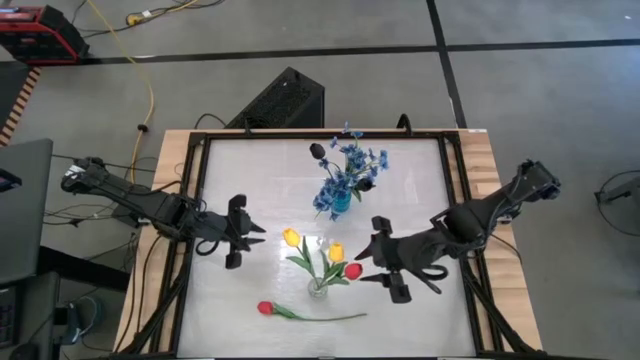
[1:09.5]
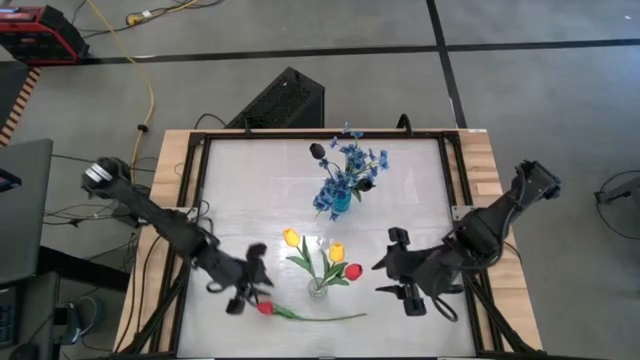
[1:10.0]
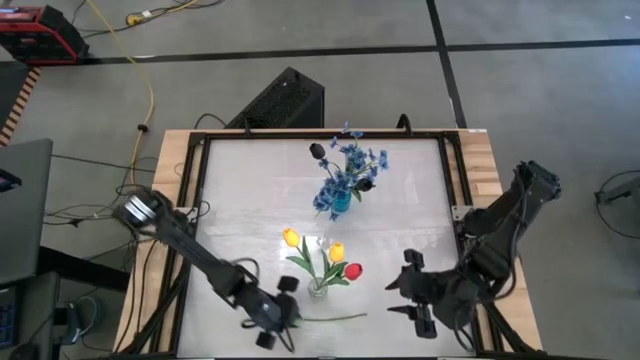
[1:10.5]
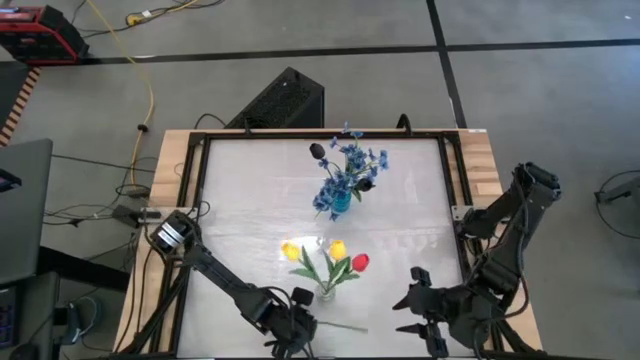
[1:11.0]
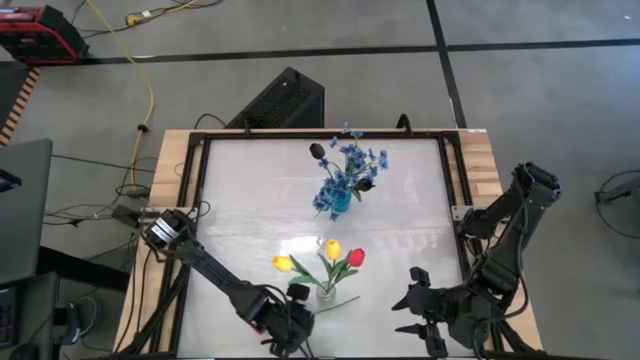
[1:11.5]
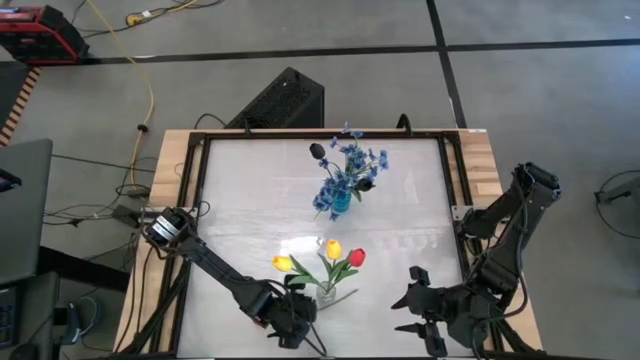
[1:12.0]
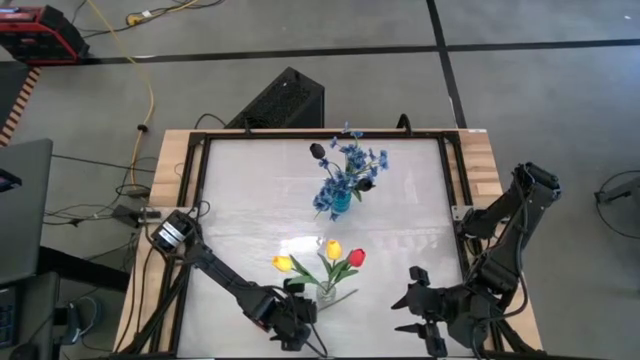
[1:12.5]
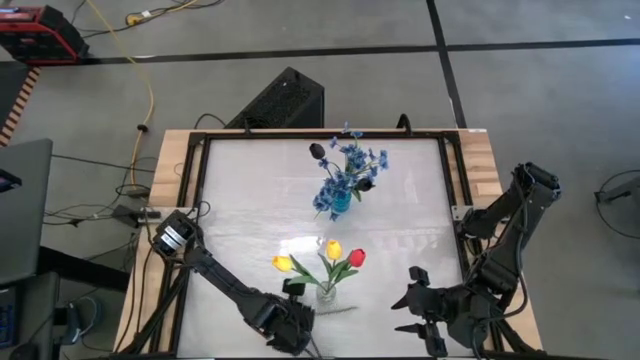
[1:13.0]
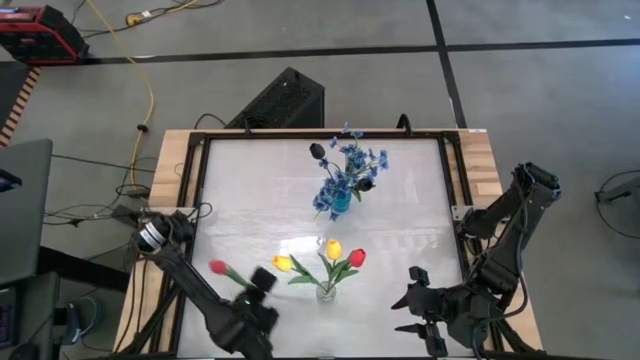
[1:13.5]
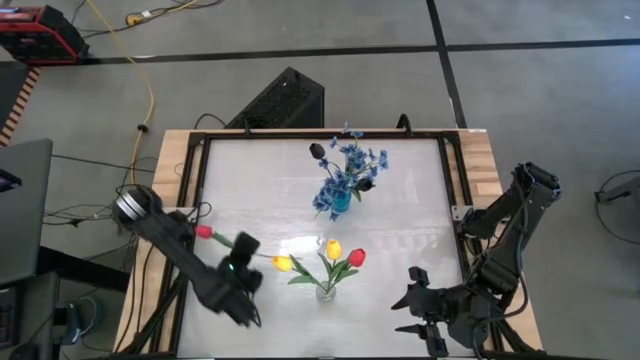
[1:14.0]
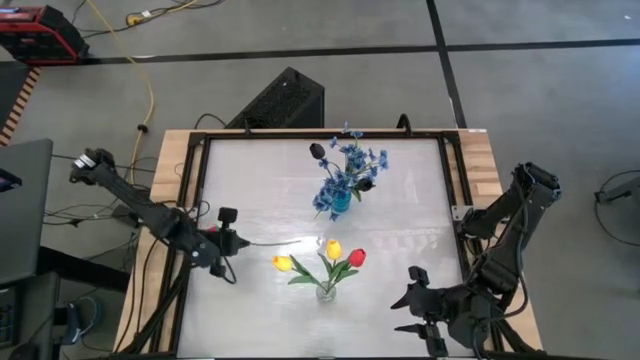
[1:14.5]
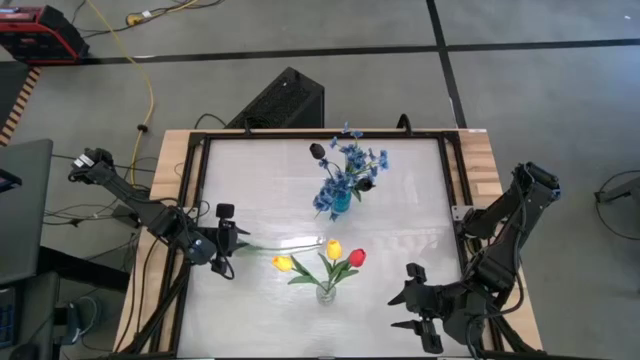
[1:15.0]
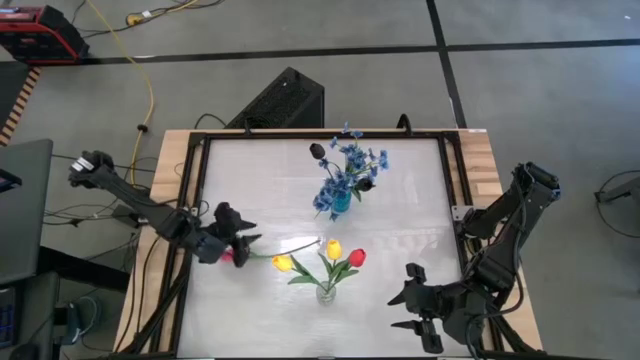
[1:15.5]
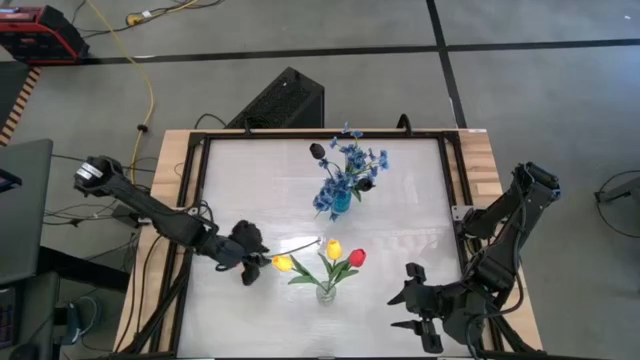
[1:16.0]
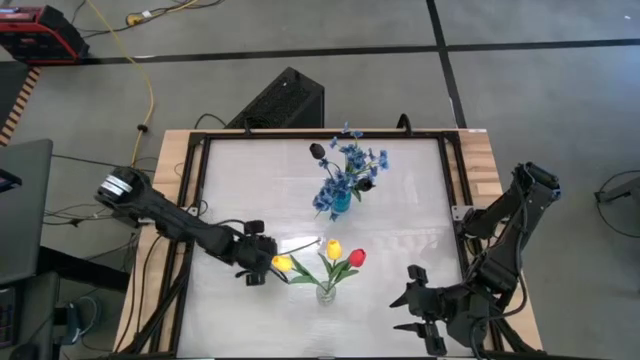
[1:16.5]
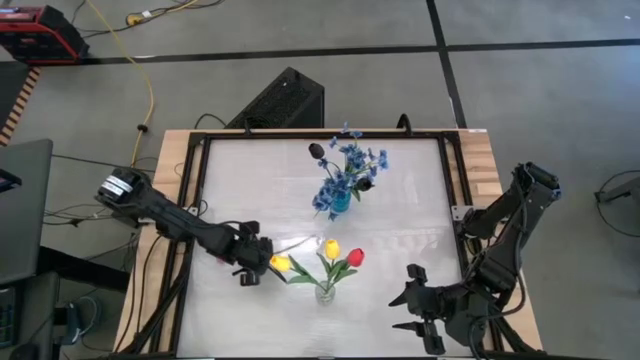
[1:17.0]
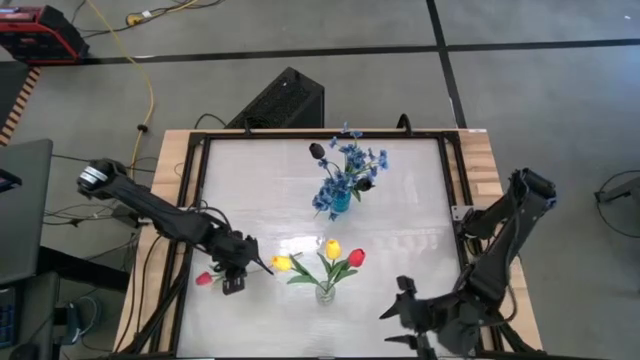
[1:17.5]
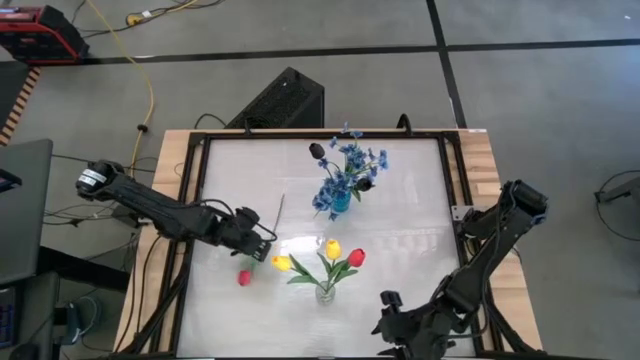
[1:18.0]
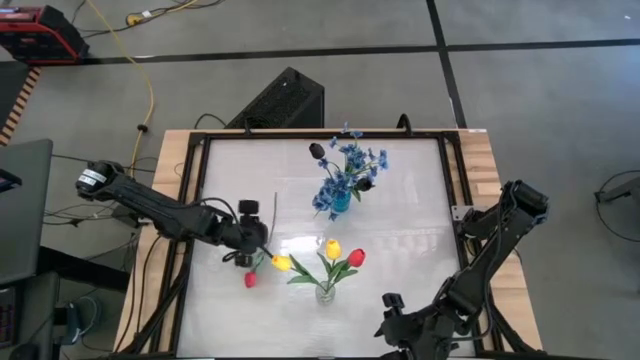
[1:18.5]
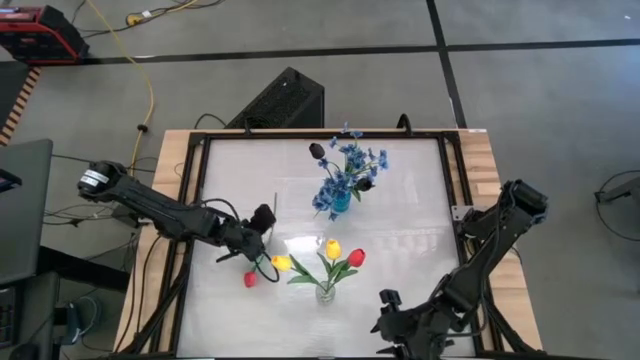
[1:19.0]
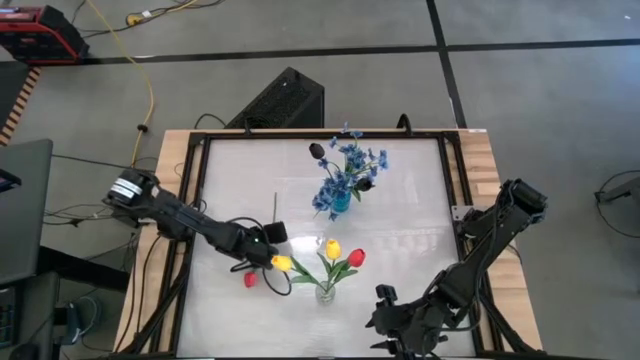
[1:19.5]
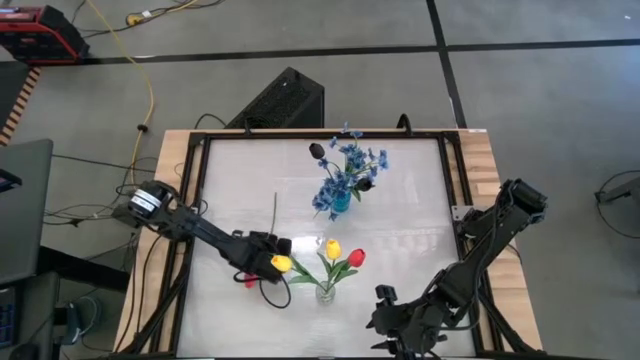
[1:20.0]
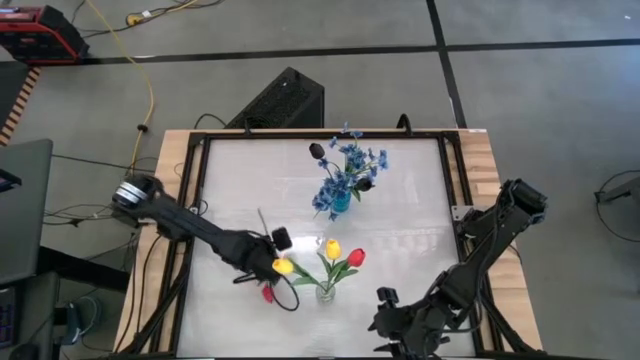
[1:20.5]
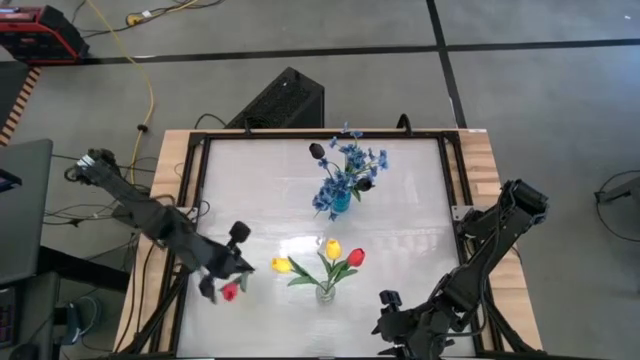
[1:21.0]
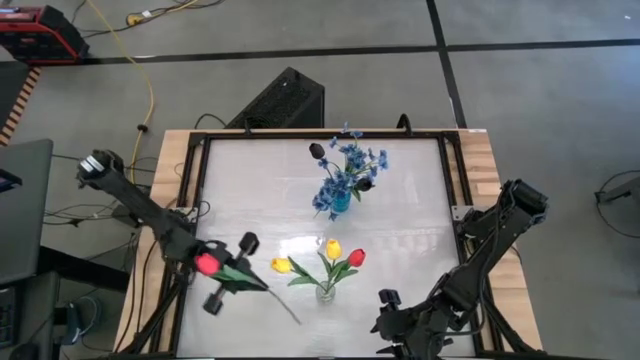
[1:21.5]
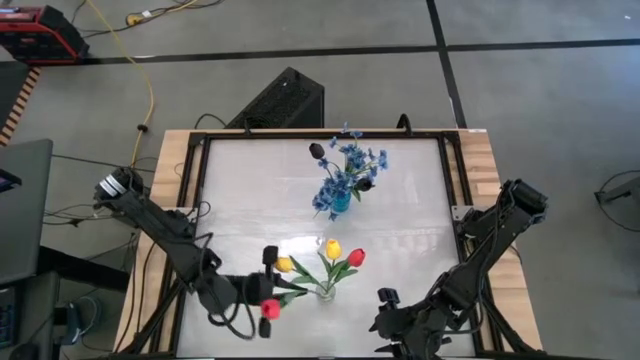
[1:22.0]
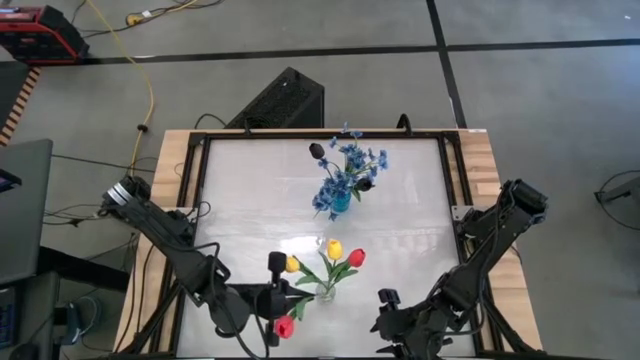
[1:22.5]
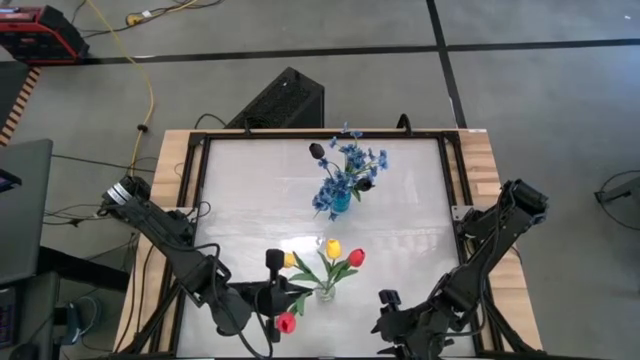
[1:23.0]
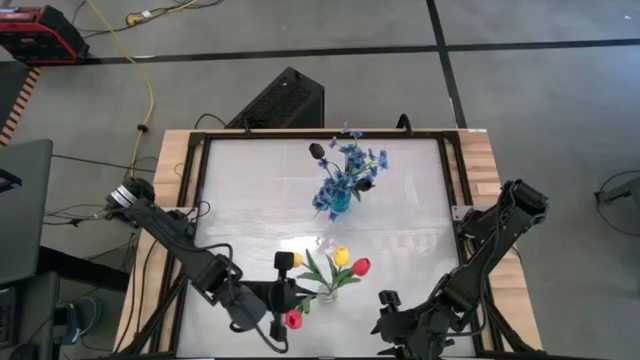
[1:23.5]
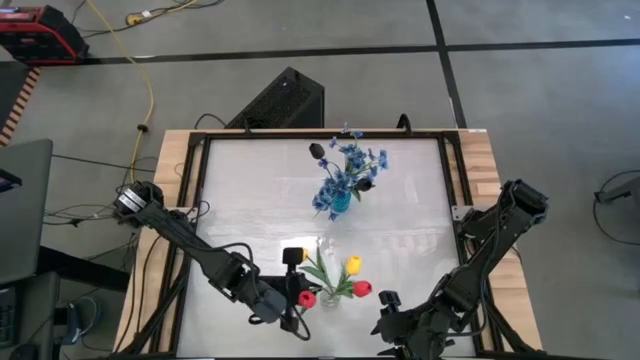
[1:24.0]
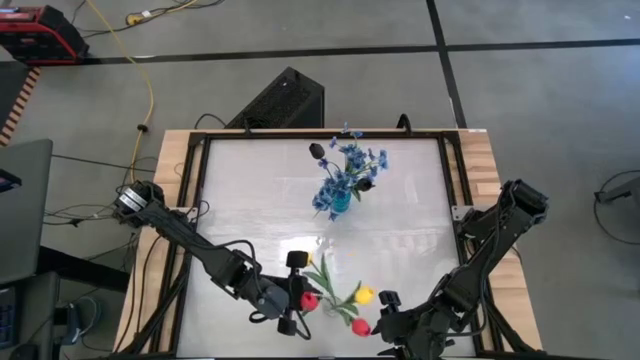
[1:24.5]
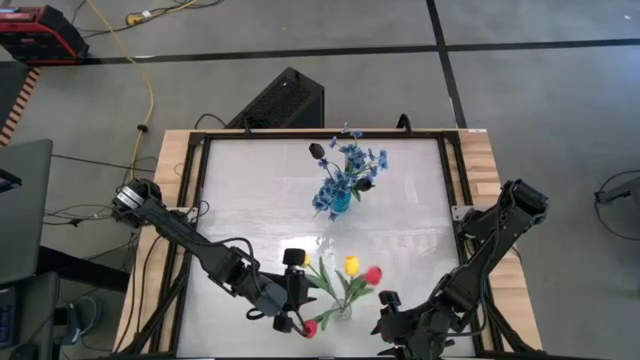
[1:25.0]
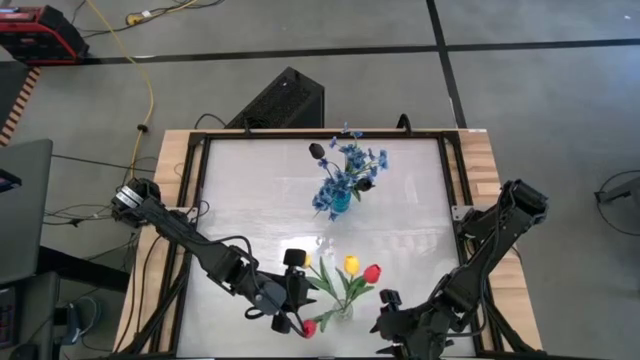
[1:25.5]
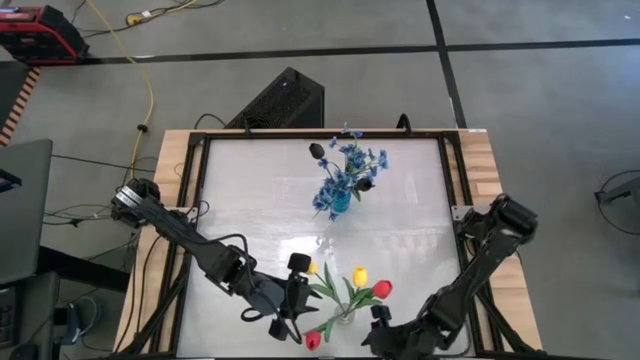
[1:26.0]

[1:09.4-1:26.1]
Task: Sort flowers into vase by color
Put the red flower into the transparent vase

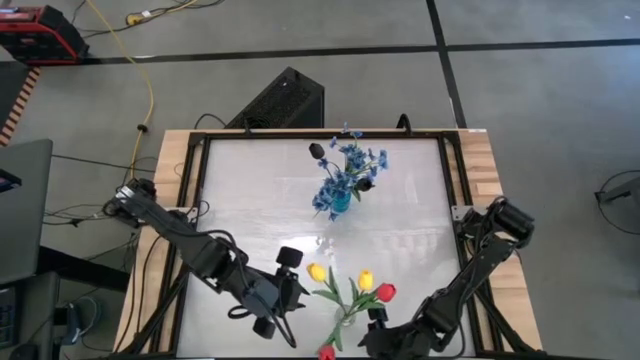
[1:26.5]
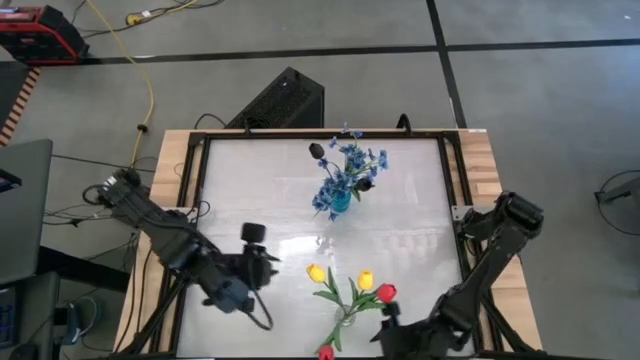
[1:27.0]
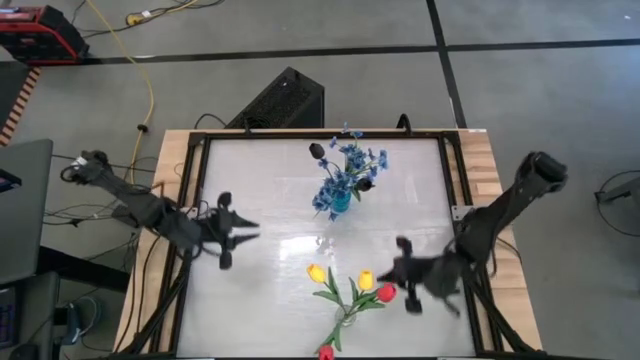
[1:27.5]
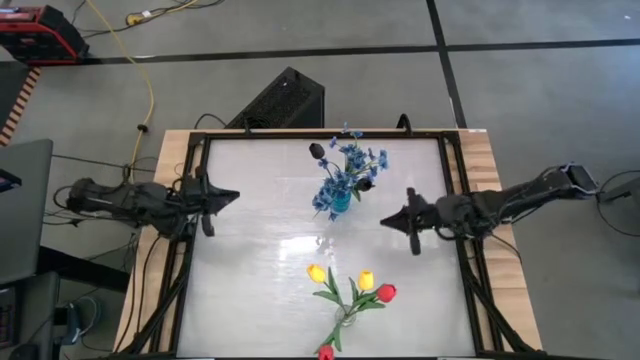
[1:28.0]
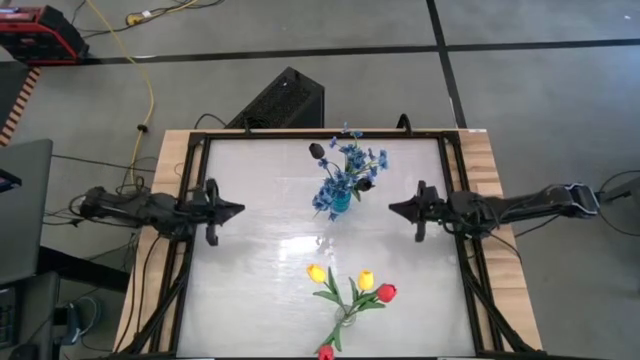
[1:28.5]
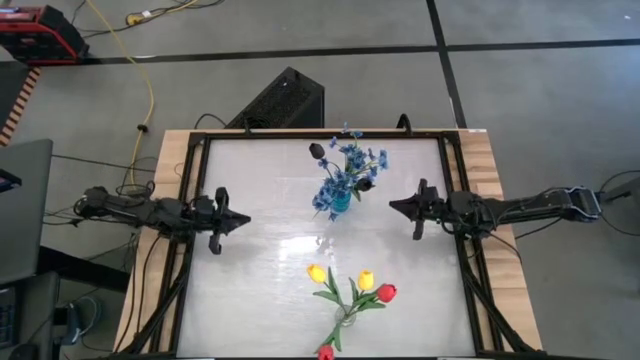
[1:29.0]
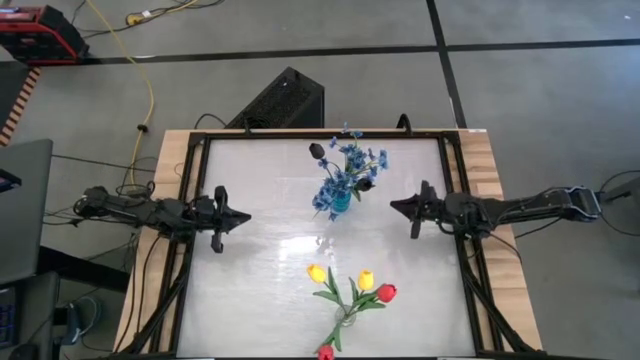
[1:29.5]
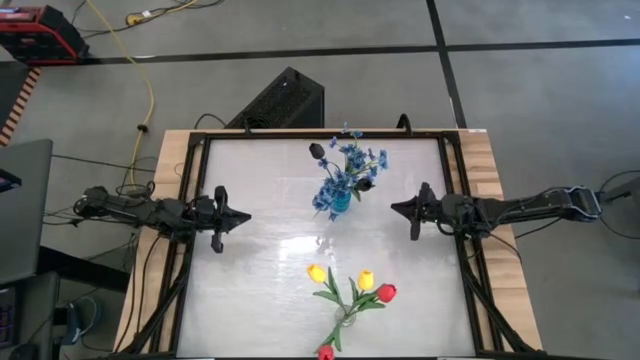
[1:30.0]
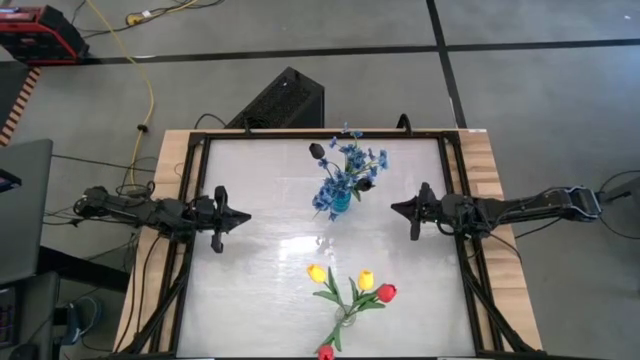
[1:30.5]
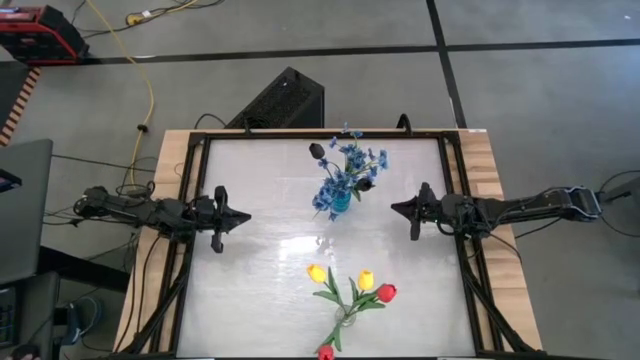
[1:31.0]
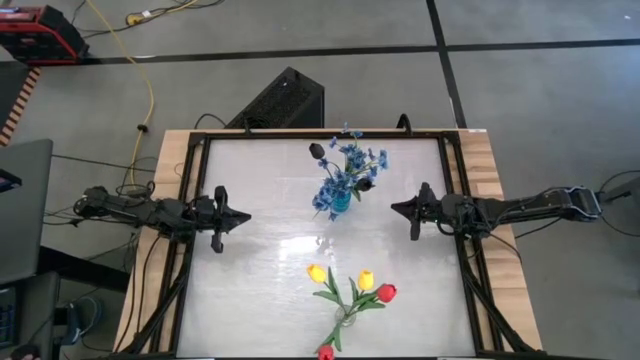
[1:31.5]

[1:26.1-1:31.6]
Return to Home Position
